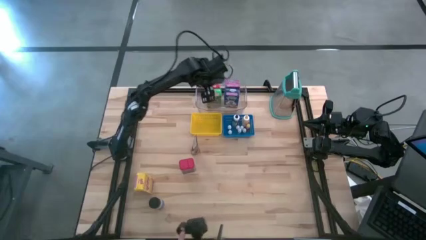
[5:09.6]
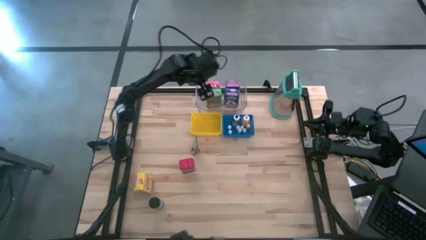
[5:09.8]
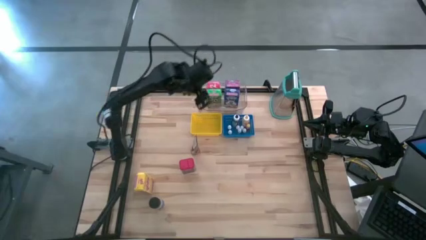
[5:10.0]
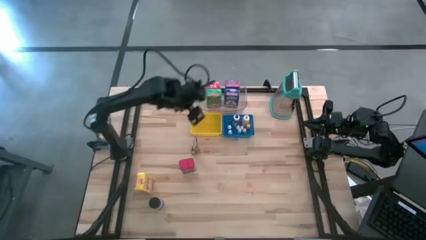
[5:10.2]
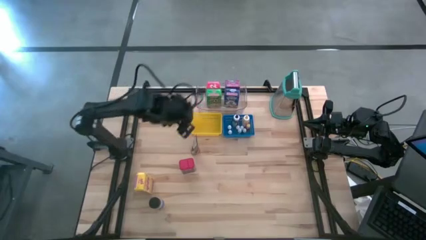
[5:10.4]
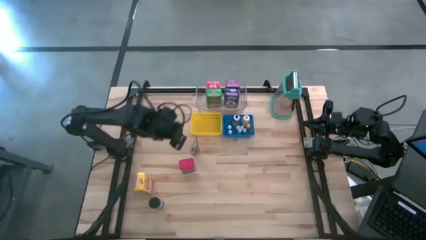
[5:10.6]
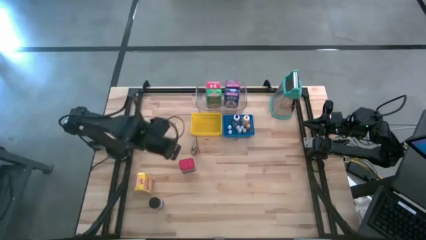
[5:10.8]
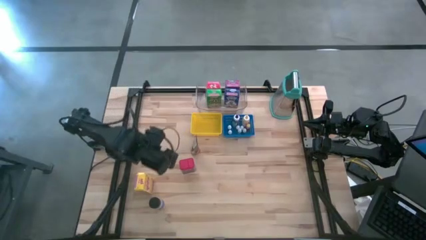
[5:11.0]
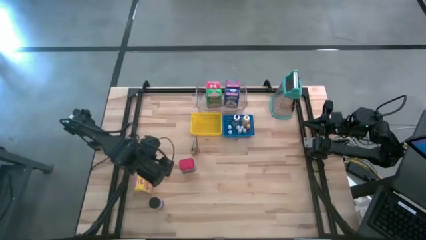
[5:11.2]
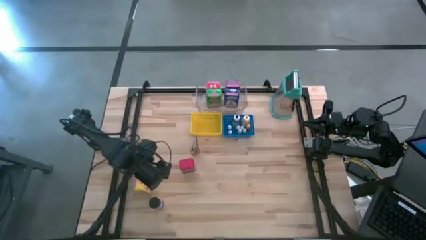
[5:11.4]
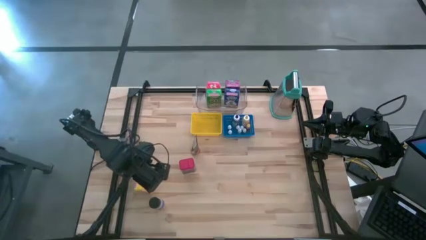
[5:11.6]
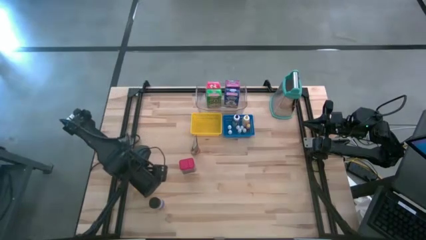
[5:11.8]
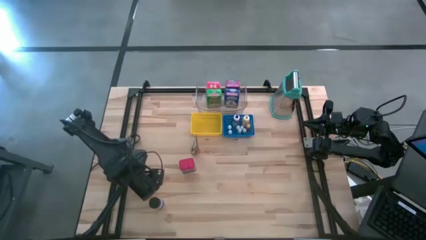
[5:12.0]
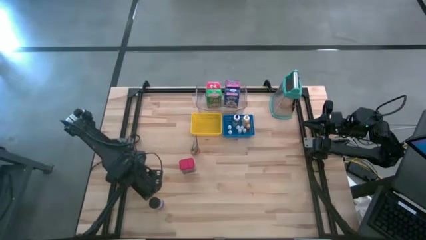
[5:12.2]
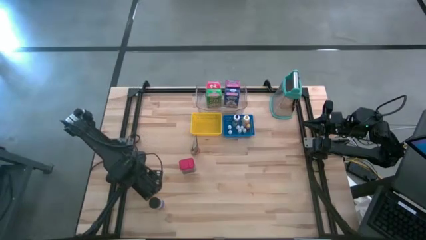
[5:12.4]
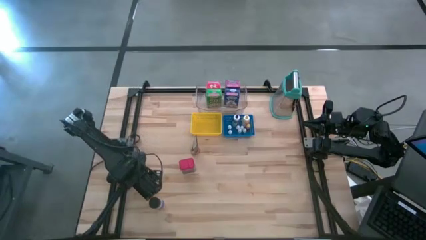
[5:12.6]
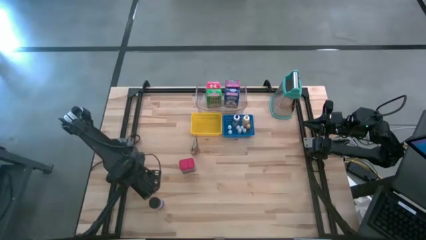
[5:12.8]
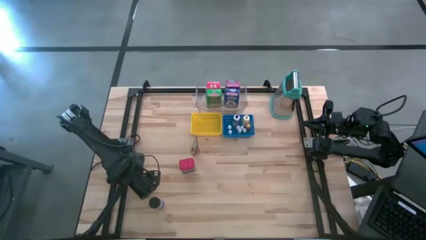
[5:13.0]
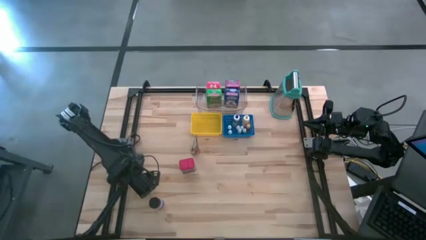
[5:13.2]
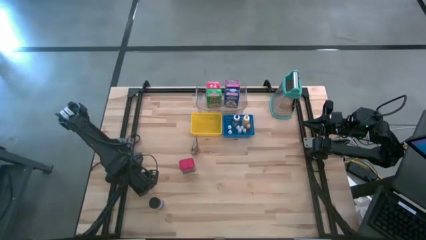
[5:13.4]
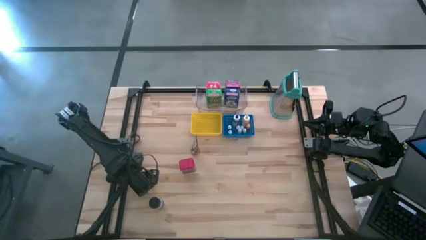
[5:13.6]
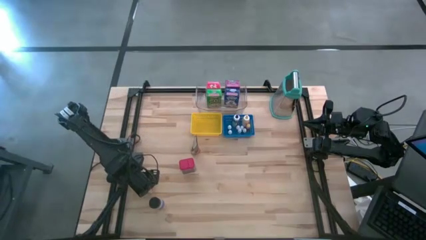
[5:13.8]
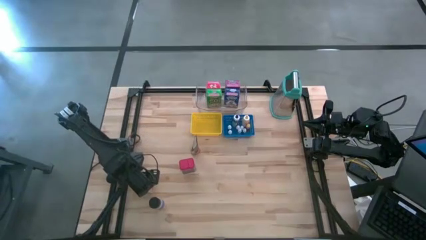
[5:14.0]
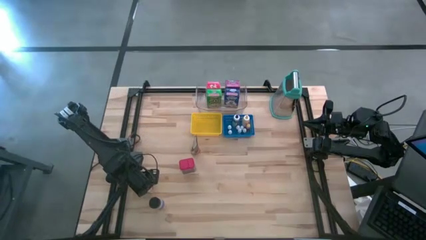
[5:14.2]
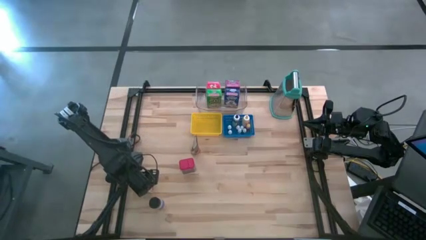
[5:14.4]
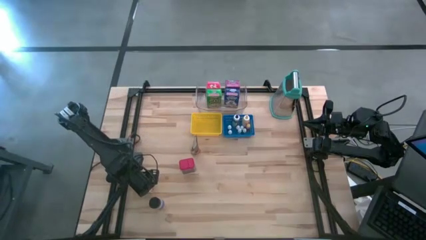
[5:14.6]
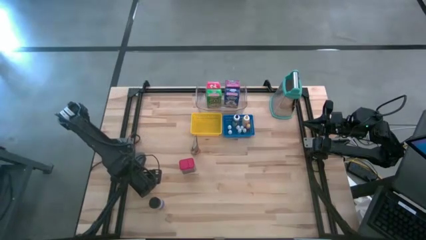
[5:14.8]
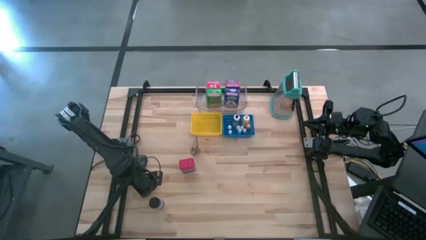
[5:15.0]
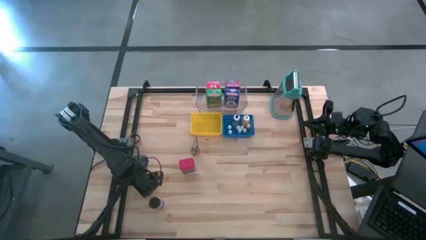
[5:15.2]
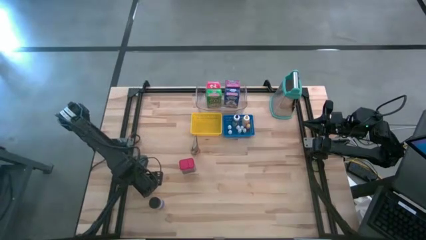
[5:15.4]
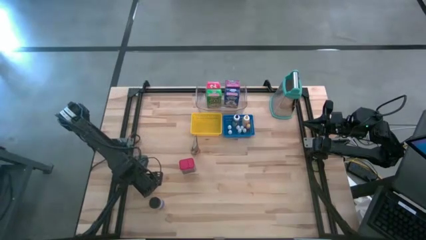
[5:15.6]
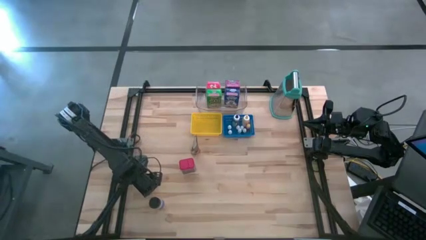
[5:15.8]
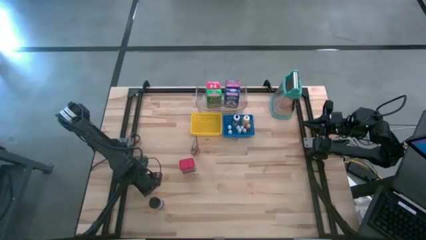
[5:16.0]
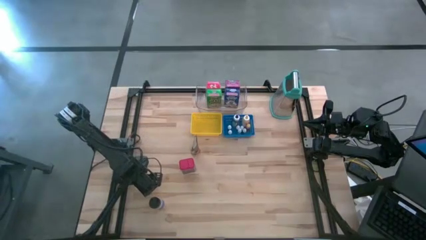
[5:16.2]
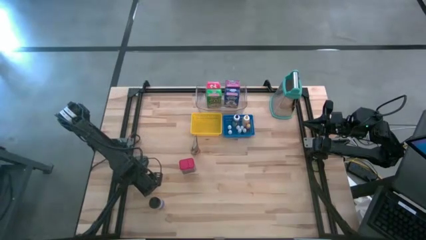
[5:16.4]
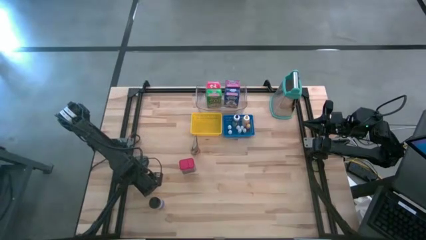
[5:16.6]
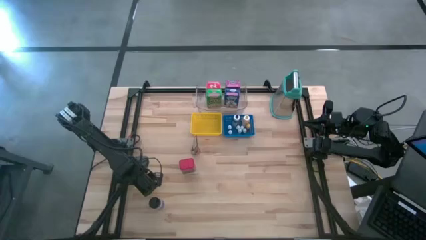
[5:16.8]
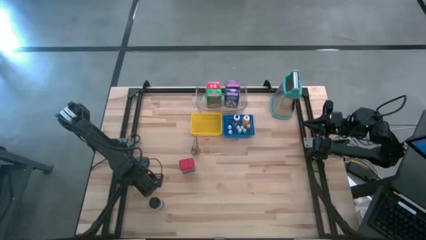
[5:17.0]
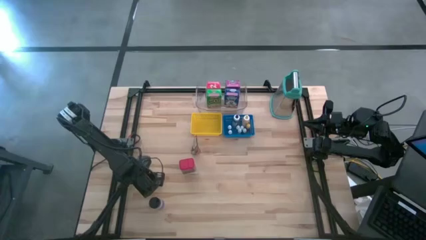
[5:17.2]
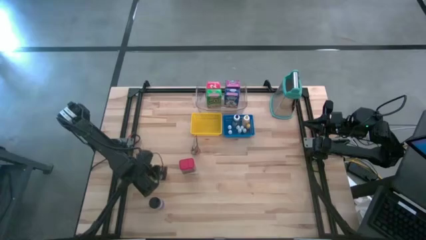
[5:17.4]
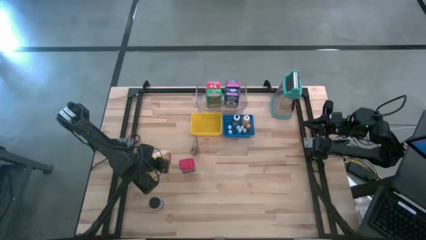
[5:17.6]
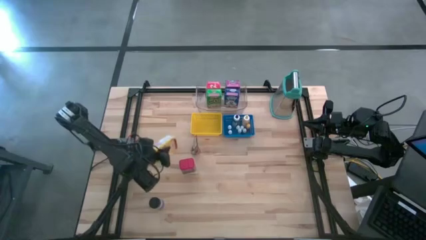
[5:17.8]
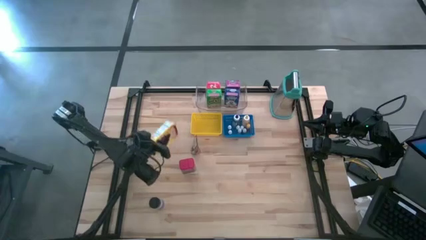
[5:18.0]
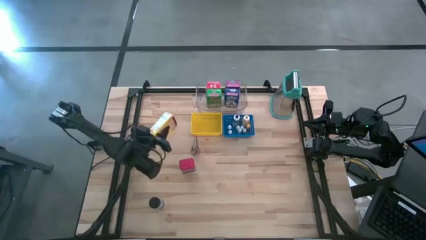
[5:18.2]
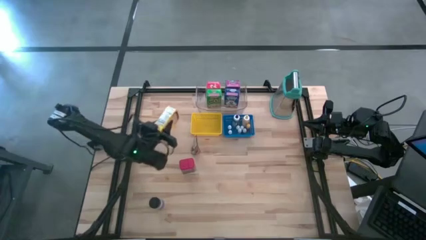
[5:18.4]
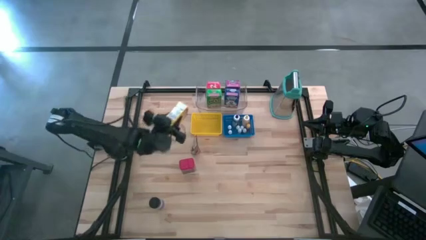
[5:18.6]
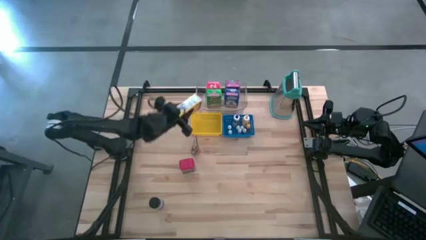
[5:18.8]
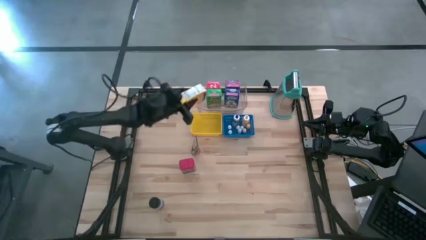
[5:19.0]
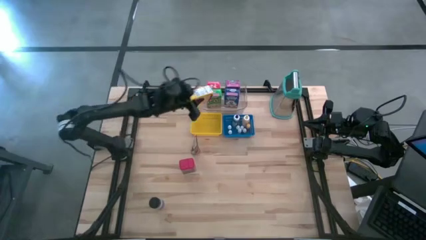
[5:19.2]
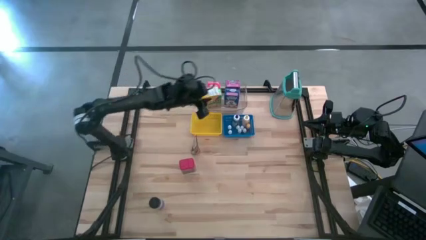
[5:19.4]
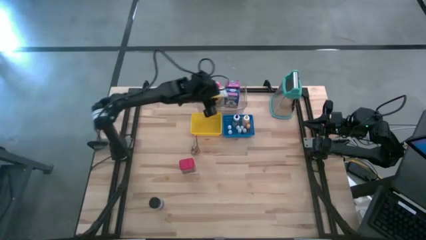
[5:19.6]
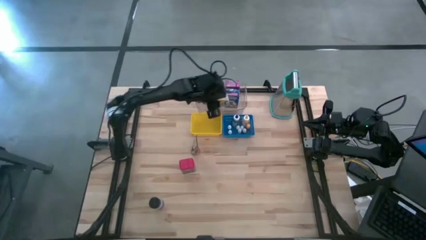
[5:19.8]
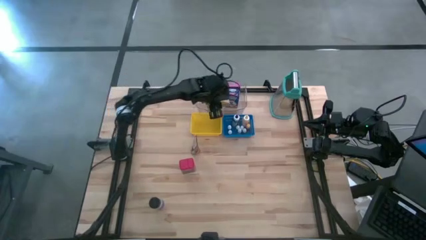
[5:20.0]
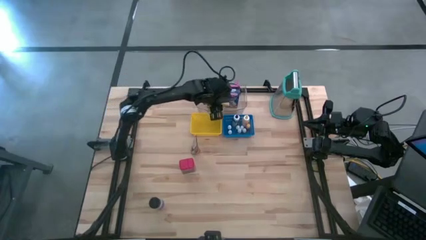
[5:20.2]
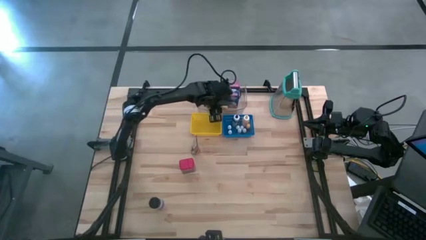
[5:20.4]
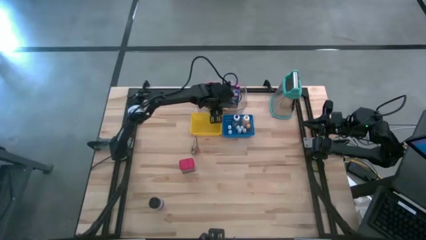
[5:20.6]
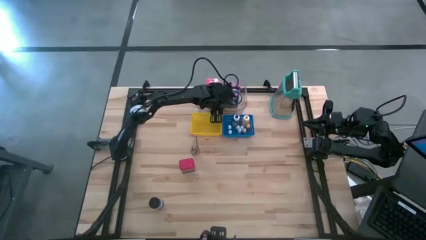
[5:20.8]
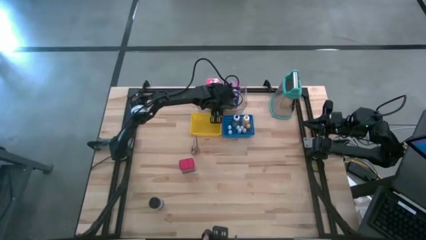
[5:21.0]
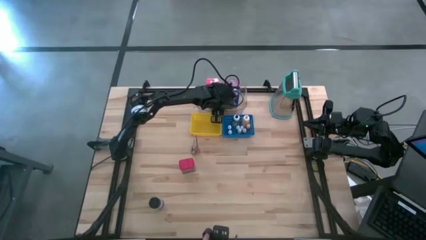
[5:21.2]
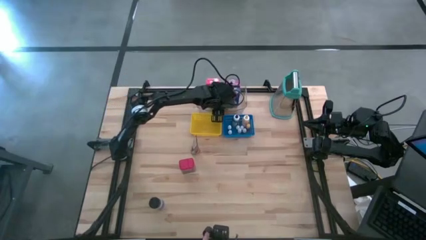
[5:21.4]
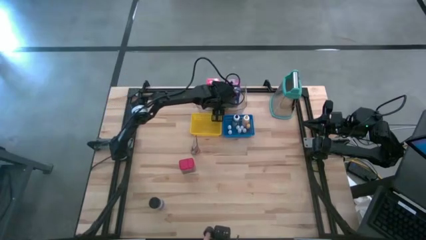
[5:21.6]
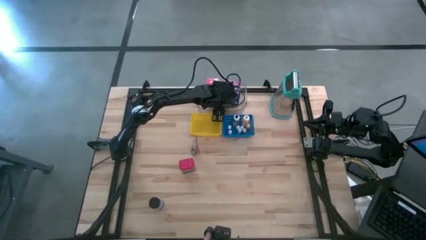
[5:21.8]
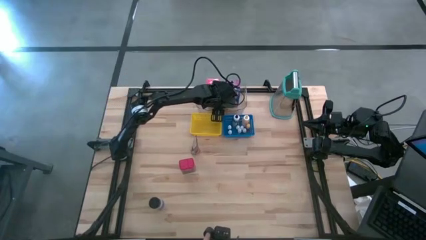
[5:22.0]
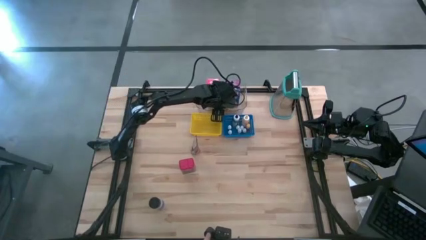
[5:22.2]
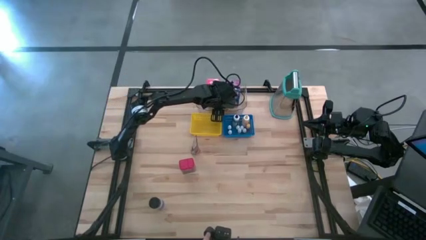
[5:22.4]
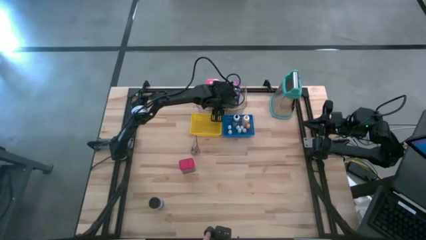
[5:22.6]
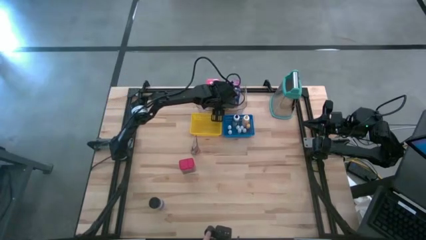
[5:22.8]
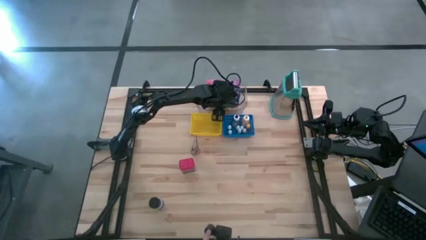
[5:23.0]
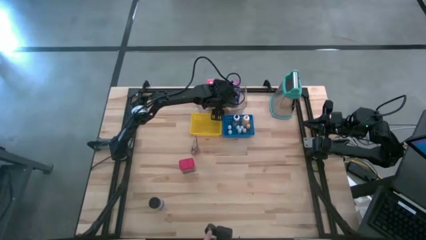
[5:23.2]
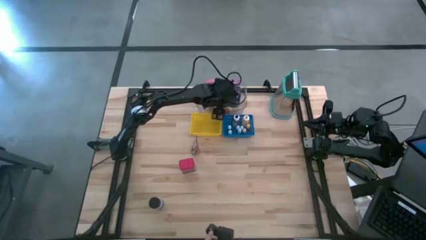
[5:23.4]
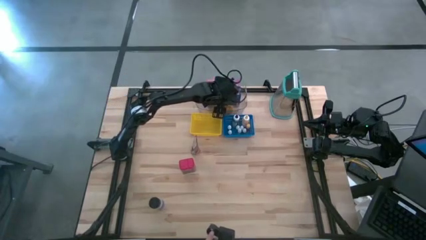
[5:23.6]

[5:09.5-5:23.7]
Task: Pick & Place Kitchen Items
Put the yellow cereal box into the transparent bin
